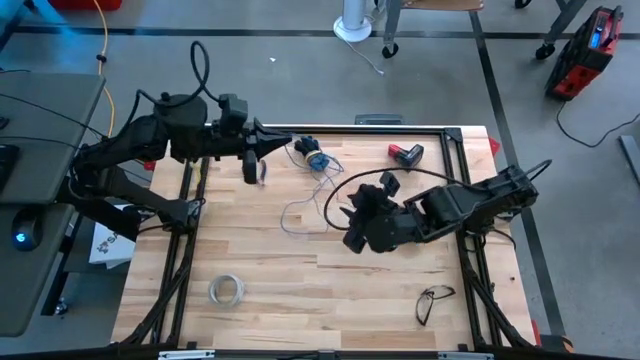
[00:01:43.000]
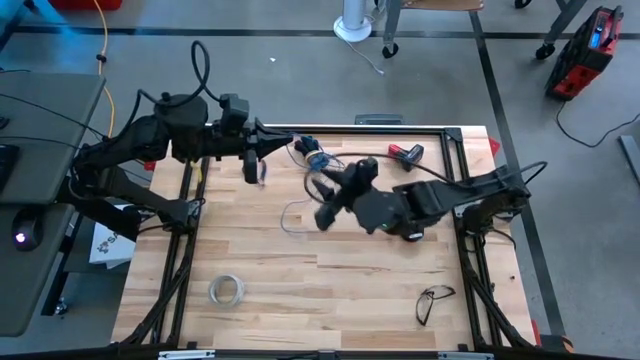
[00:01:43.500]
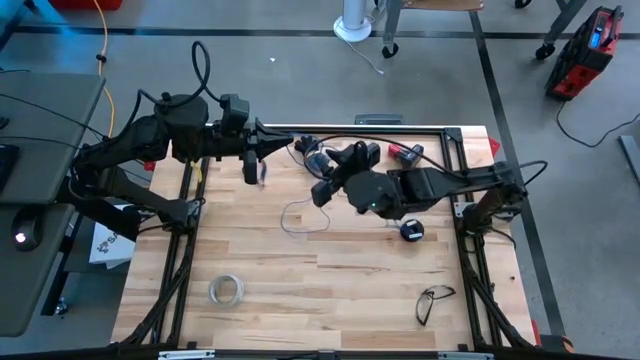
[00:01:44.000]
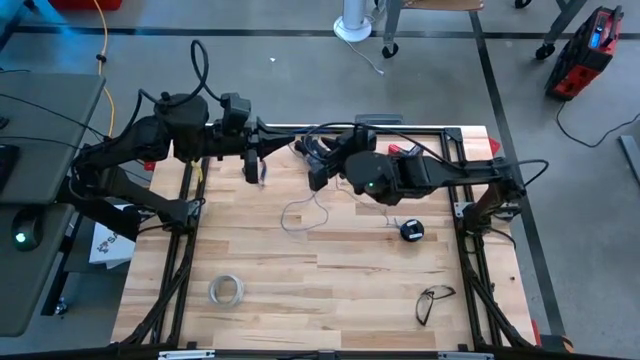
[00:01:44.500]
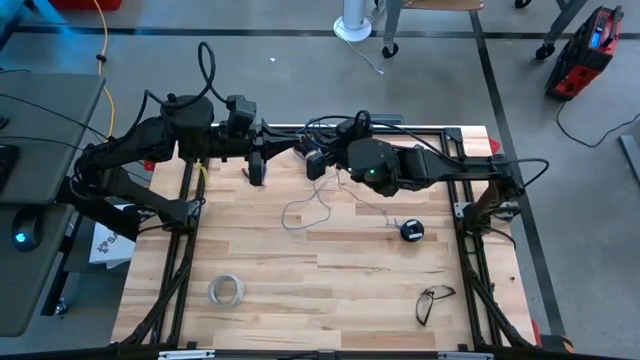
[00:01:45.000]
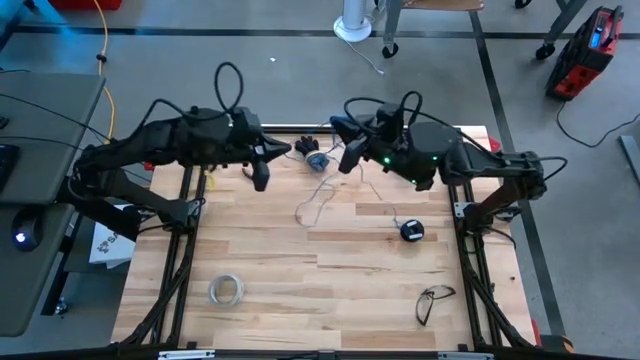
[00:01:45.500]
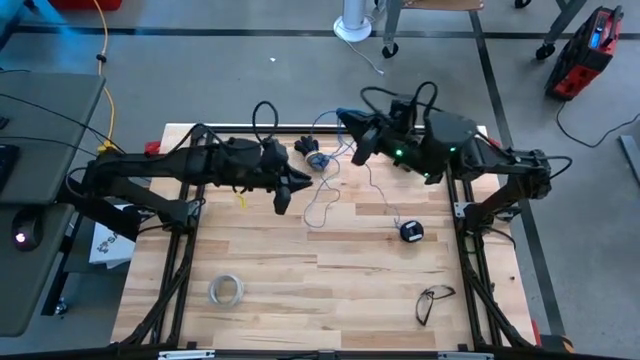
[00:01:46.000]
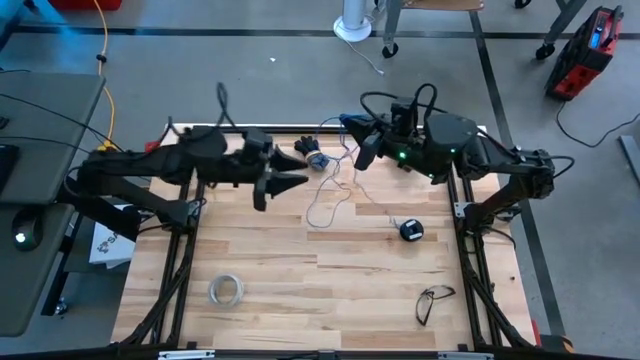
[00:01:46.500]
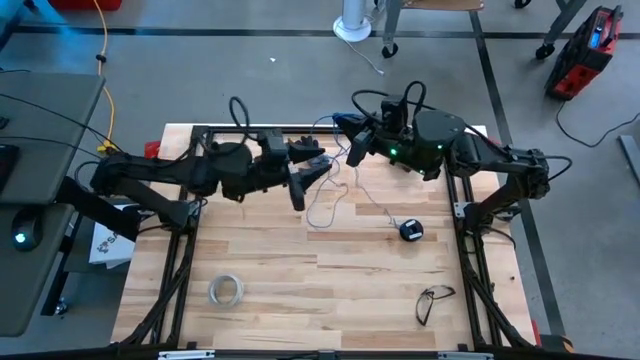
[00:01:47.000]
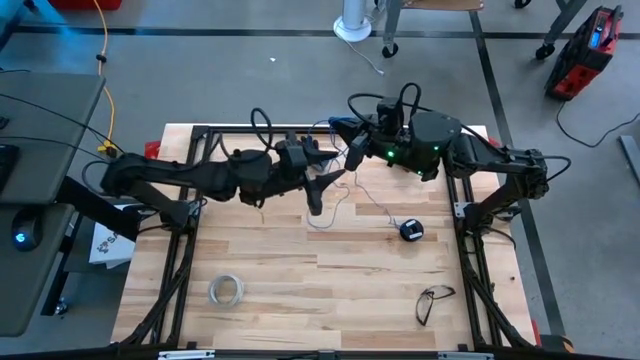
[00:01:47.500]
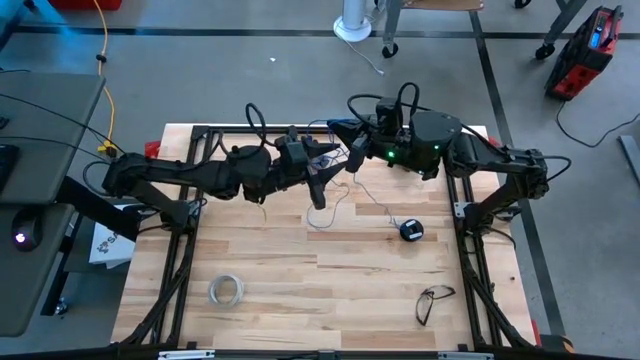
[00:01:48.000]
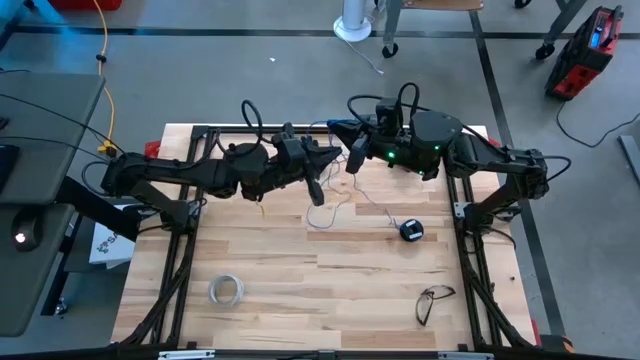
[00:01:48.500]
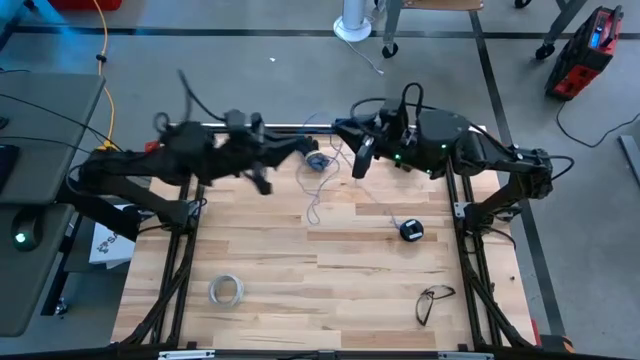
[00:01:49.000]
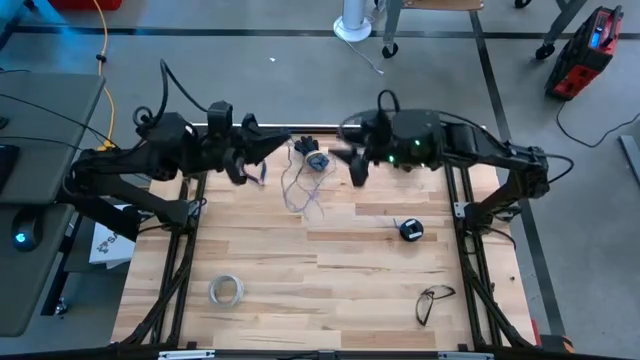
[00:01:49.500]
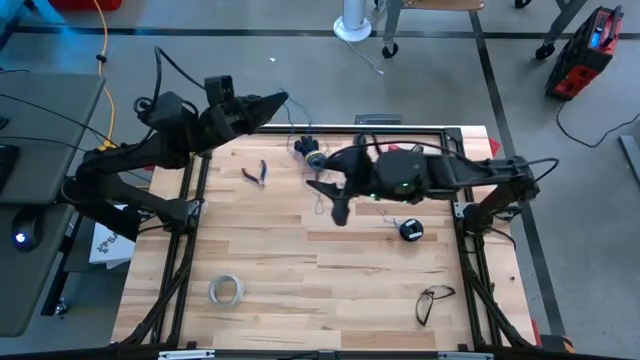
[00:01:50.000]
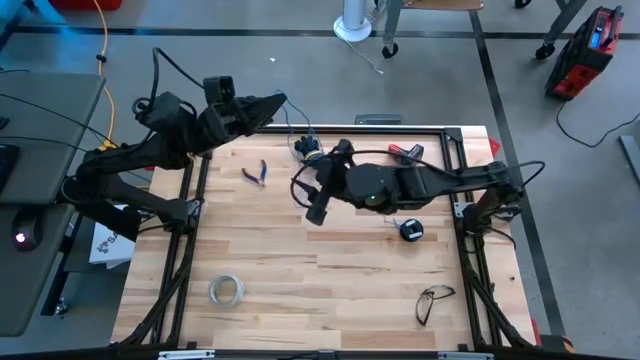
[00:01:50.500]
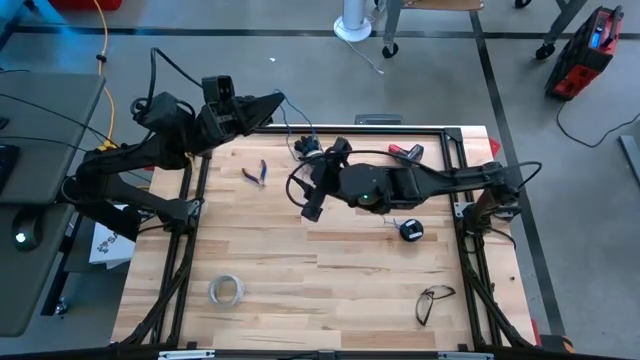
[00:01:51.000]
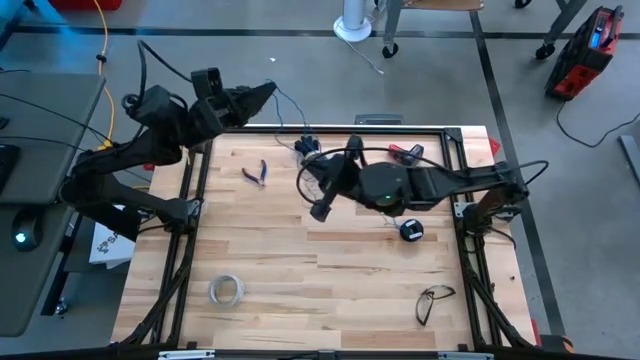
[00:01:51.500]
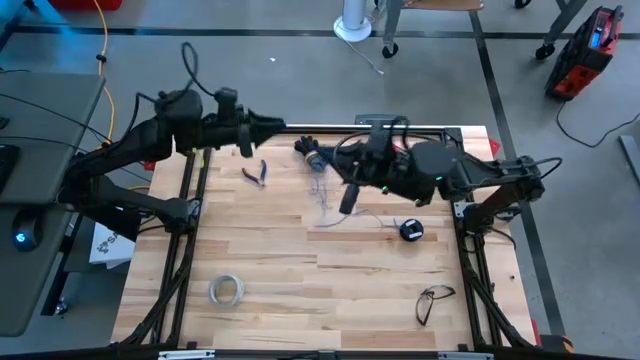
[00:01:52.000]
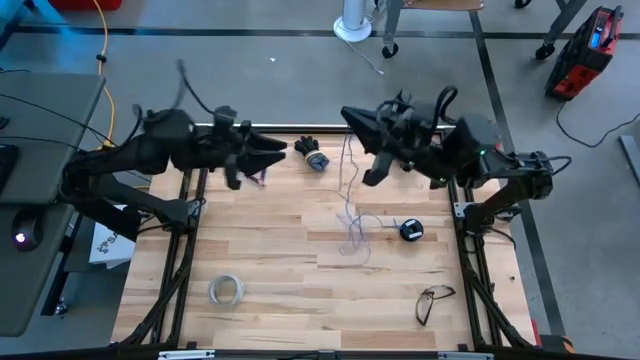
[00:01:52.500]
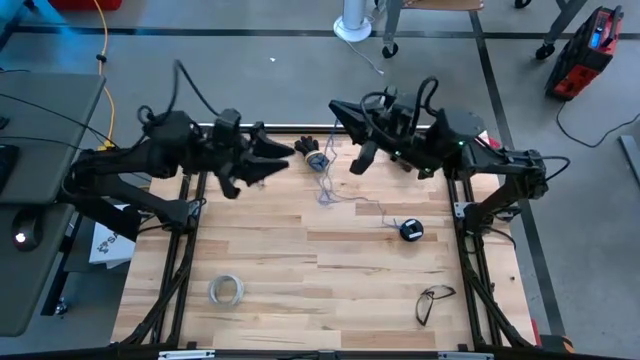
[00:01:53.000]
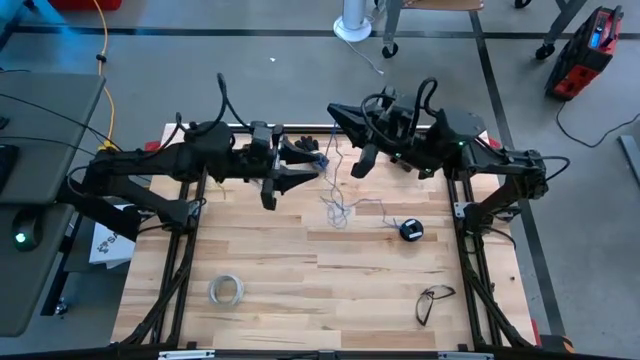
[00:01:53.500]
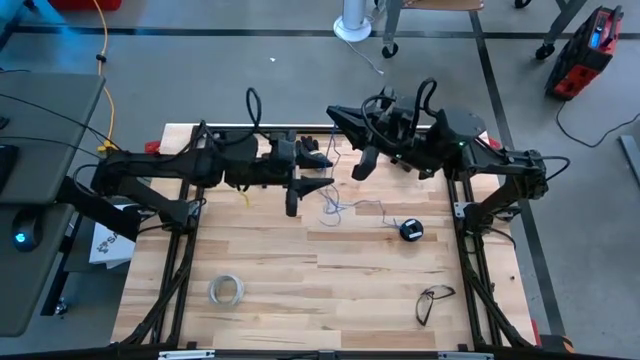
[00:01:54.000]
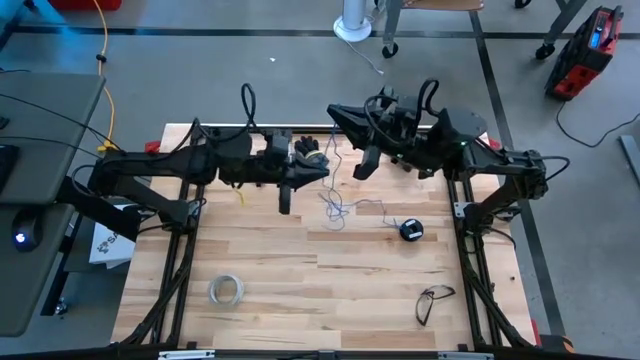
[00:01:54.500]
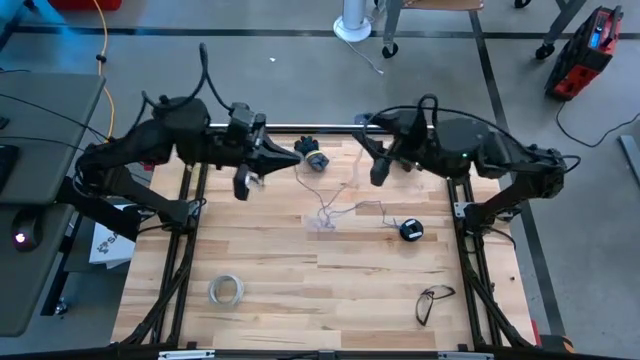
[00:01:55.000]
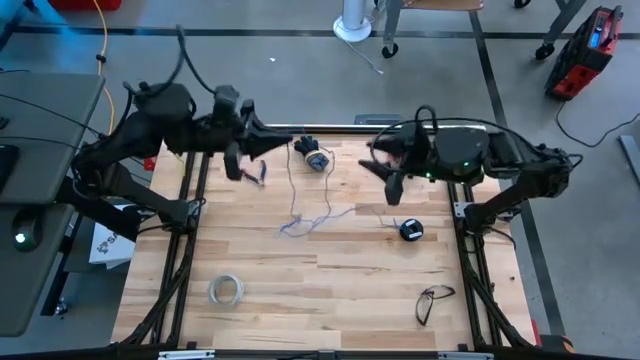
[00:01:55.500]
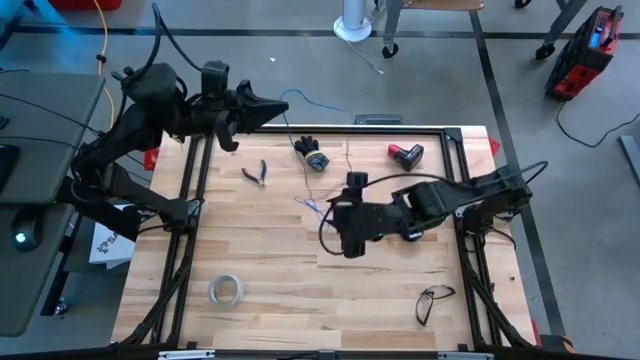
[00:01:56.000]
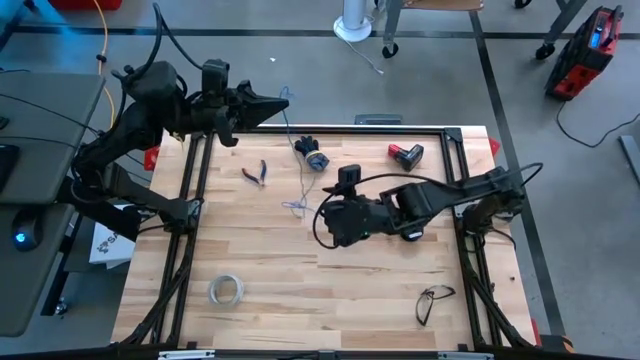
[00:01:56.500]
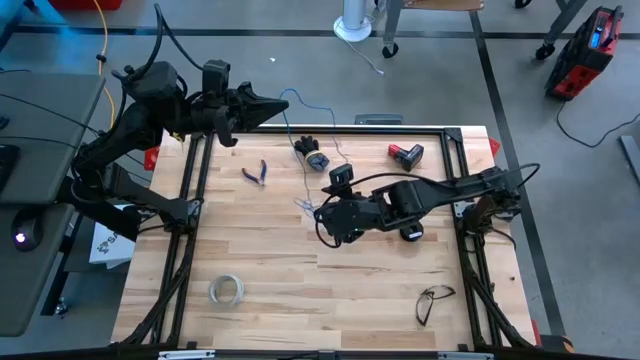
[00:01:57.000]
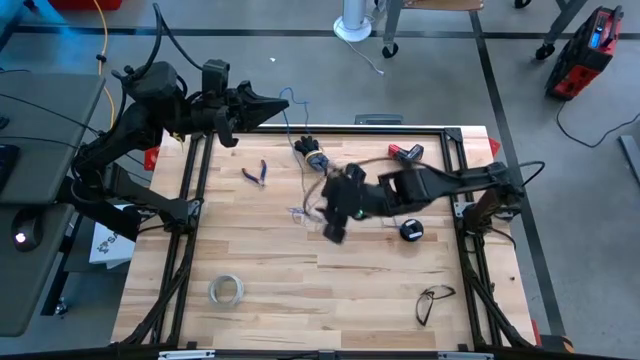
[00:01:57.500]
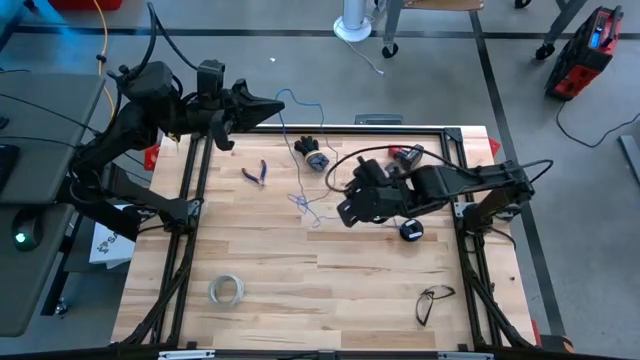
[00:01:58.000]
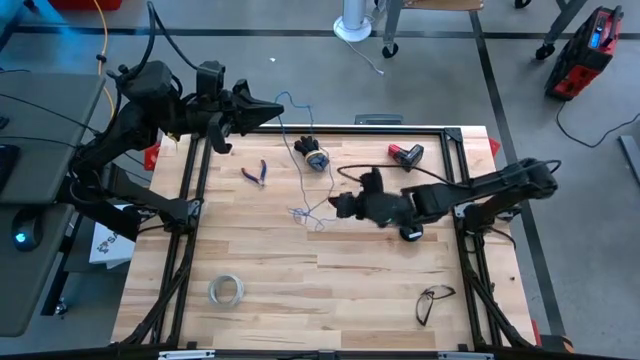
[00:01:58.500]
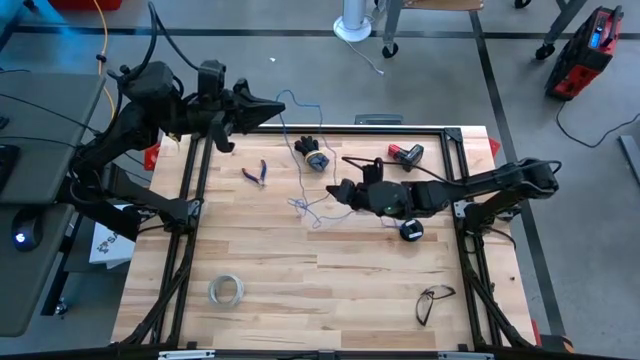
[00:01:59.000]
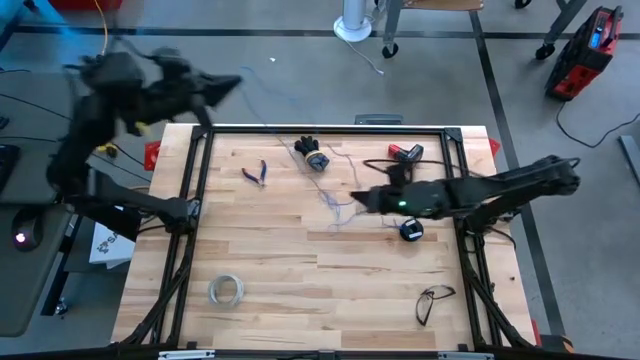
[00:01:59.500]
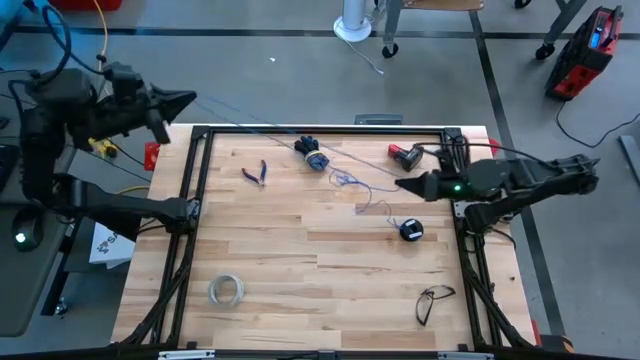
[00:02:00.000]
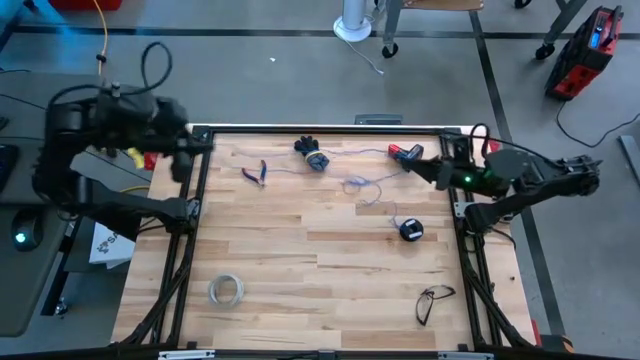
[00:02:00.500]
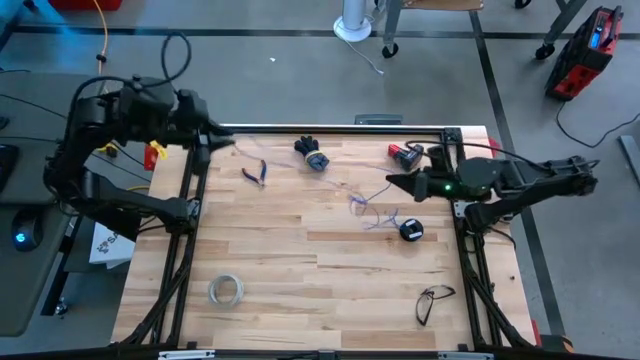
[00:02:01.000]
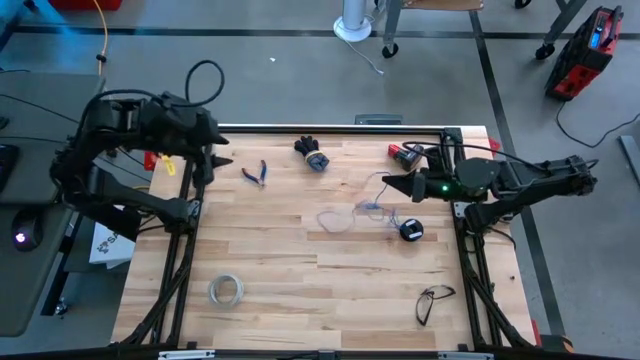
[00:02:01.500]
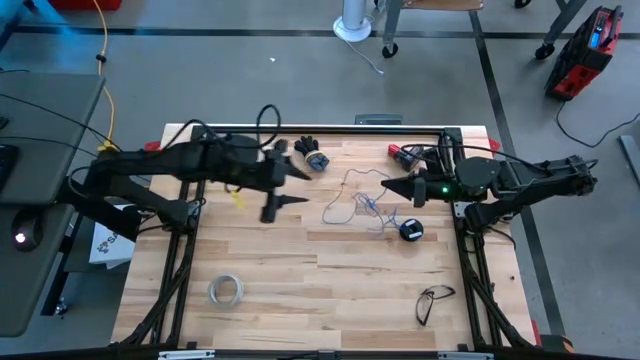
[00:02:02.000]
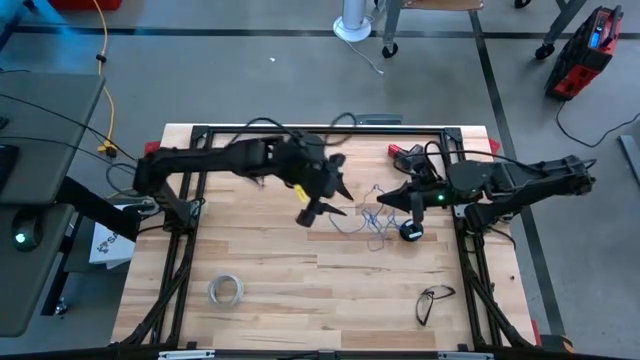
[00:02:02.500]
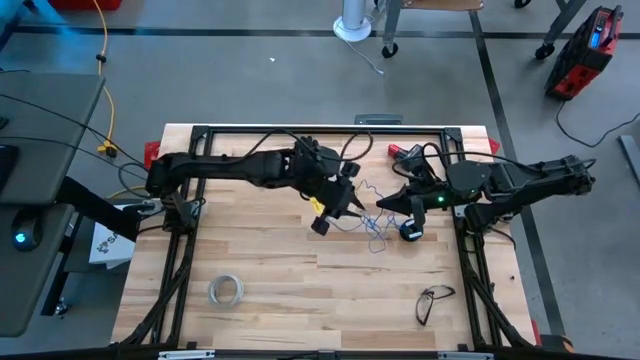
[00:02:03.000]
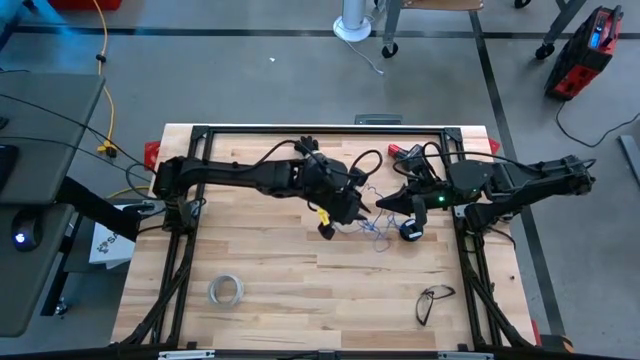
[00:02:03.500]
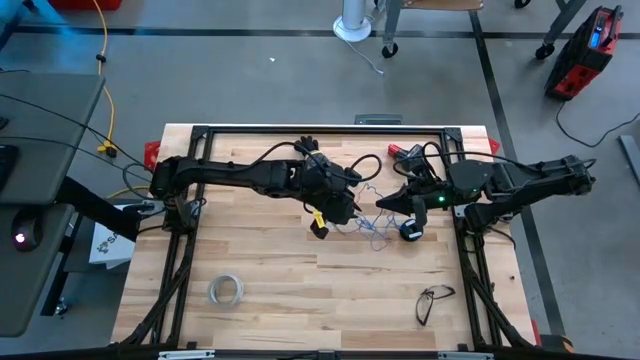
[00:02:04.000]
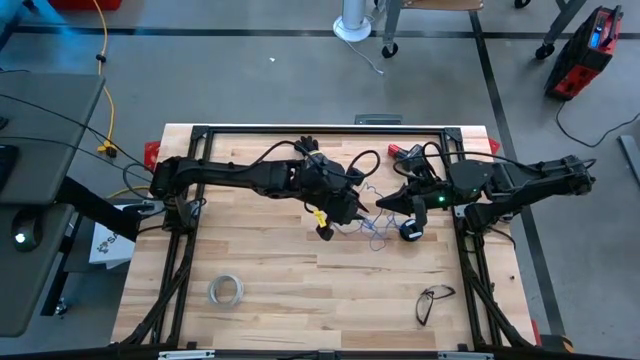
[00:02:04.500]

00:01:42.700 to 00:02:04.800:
Task: Coil cords
Uncoil the blue wire from the black spool
